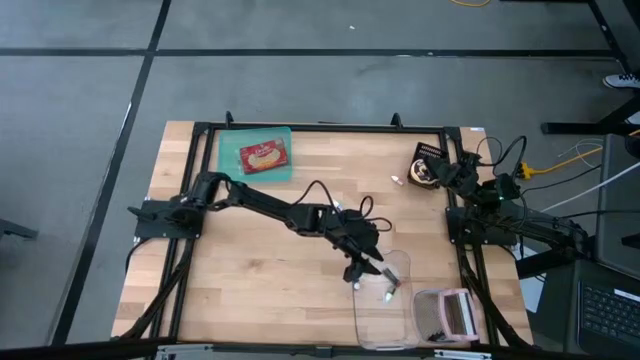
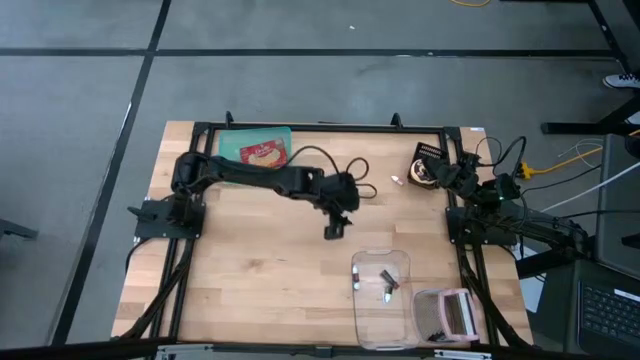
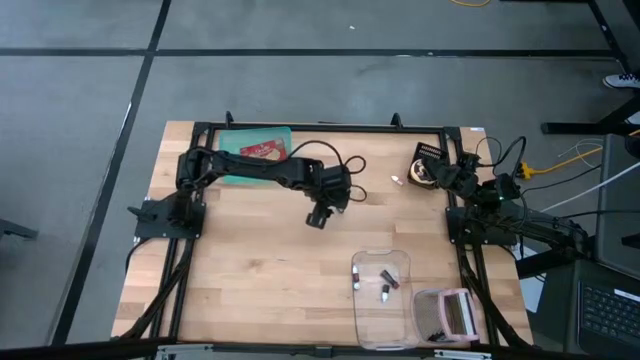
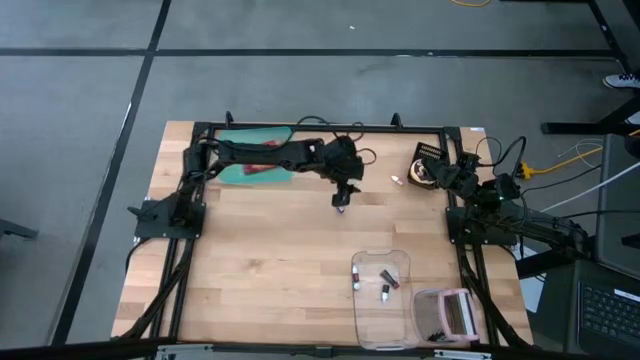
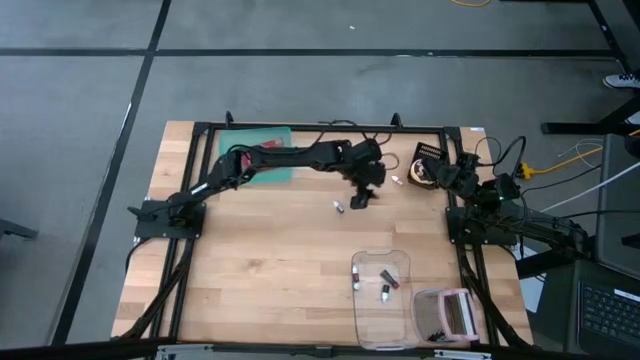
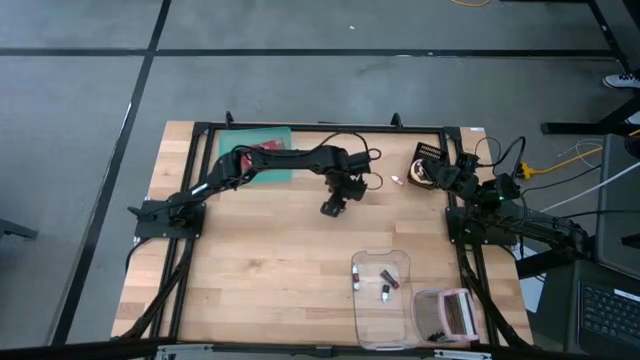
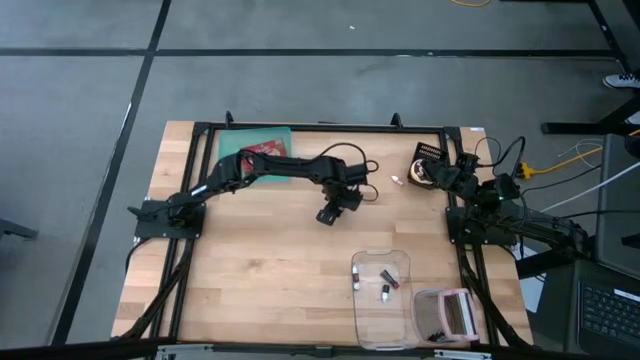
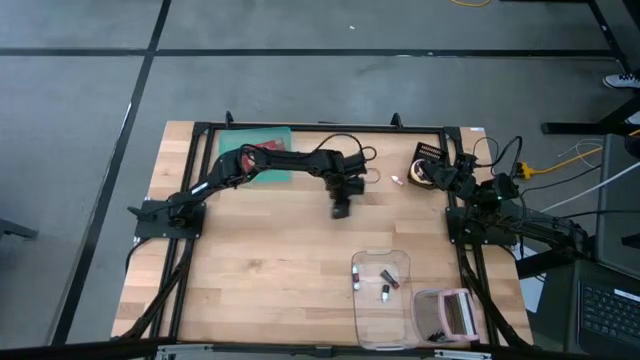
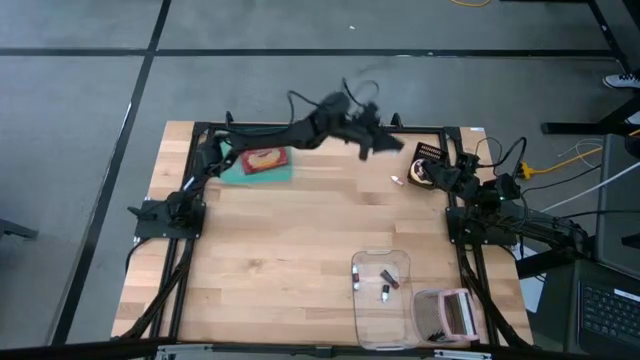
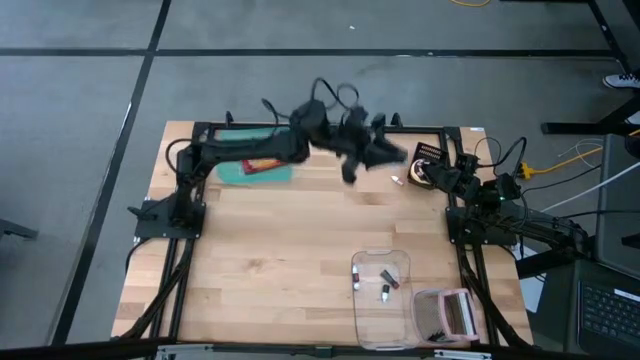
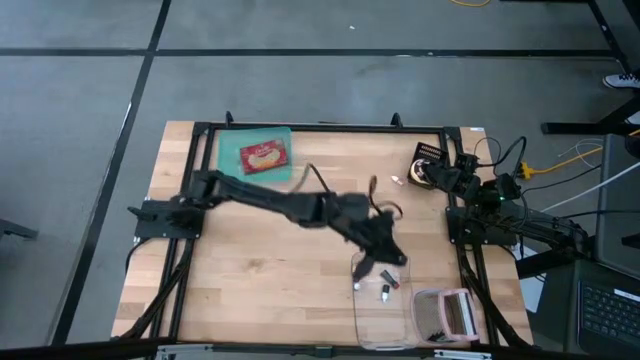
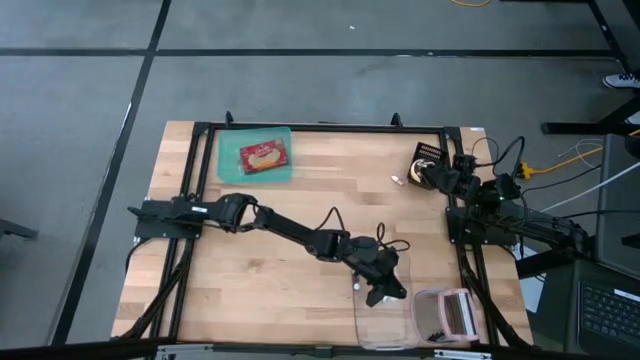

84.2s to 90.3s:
Put the purple food coloring bottle into the transparent bin

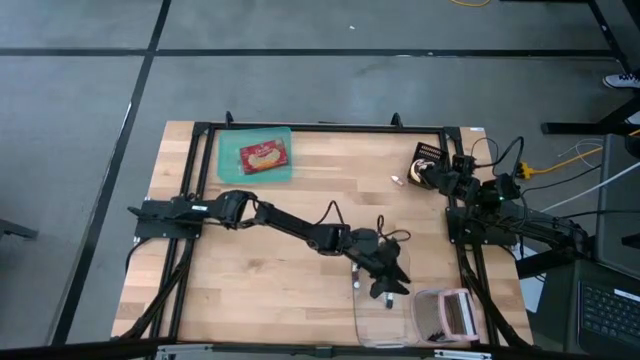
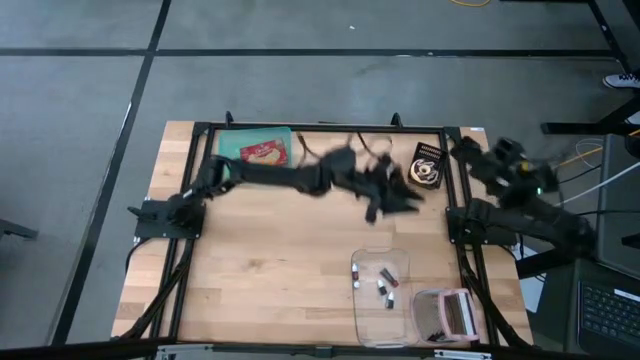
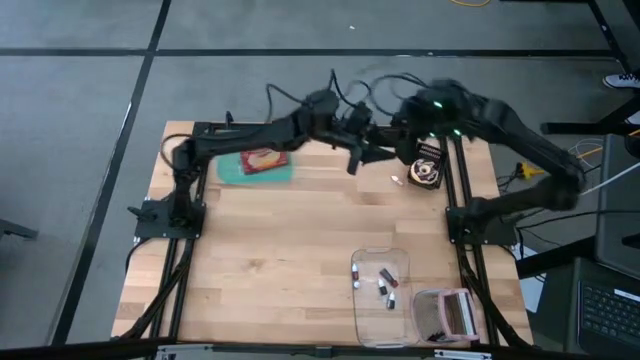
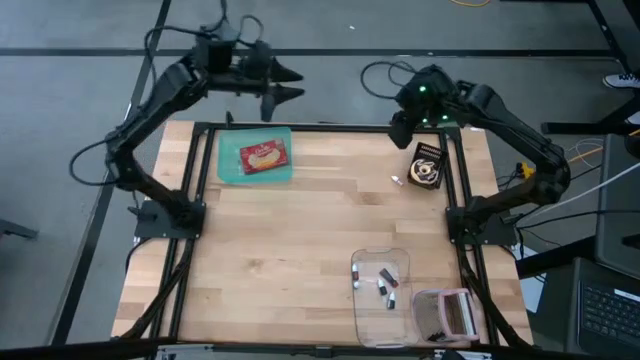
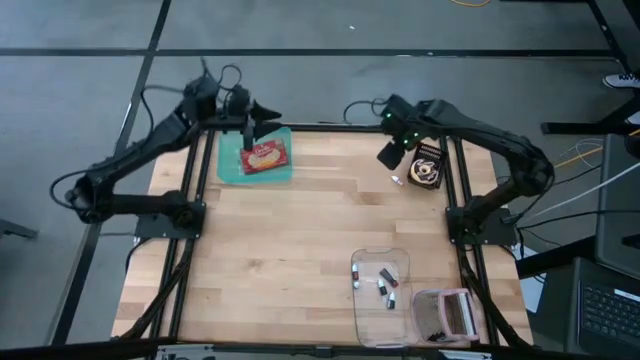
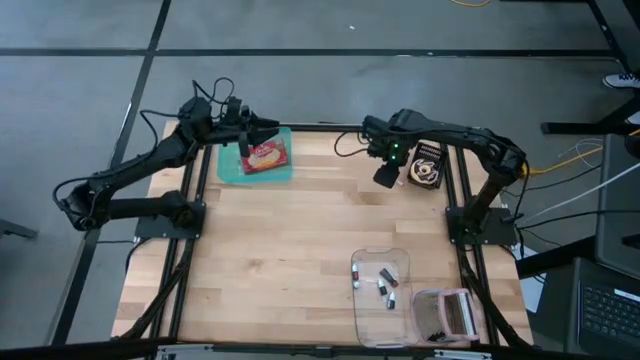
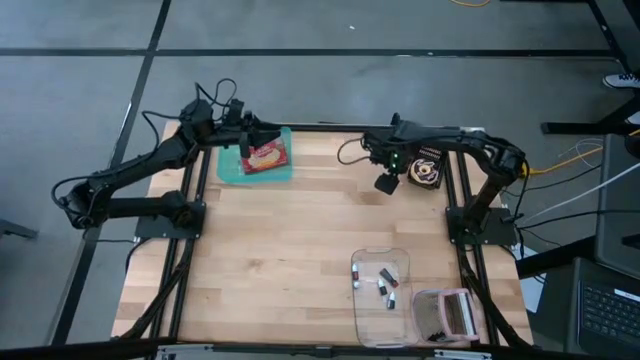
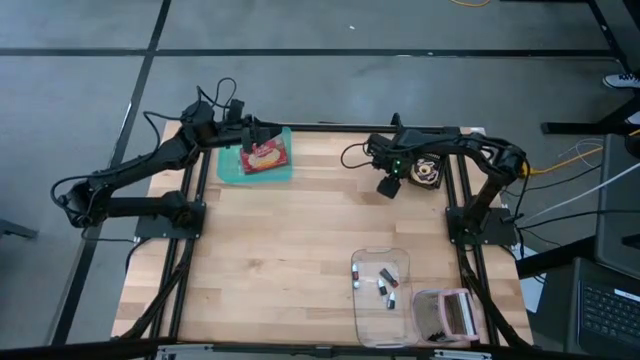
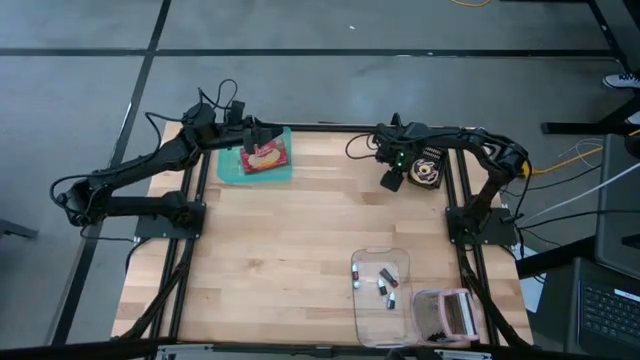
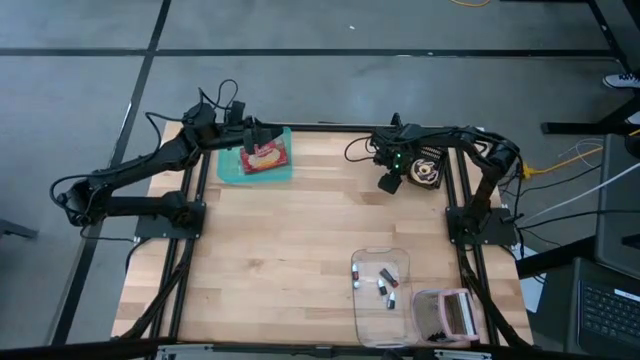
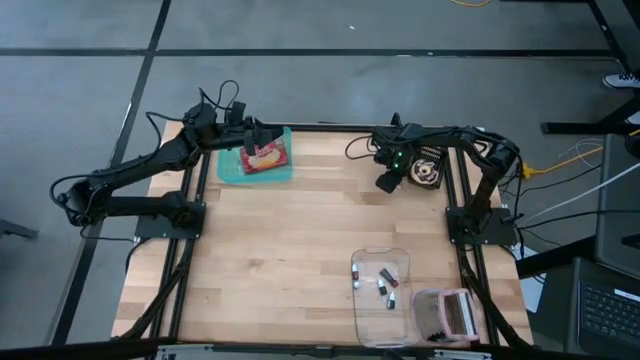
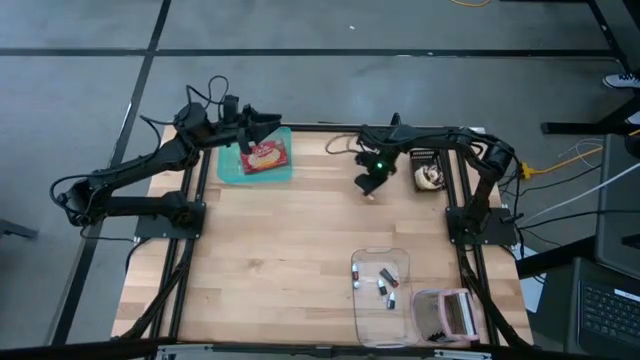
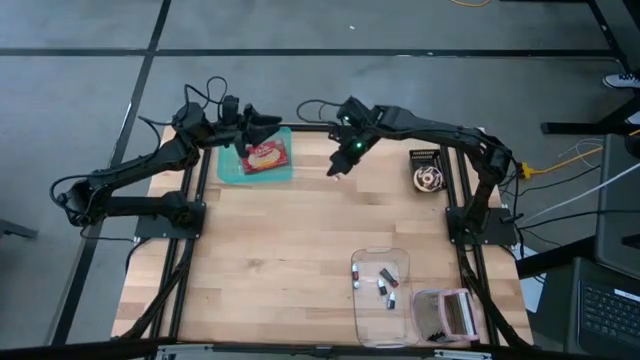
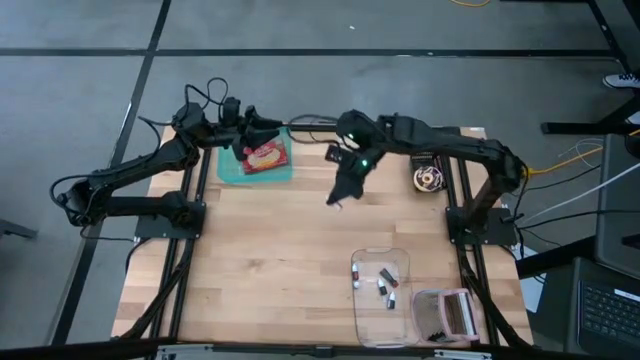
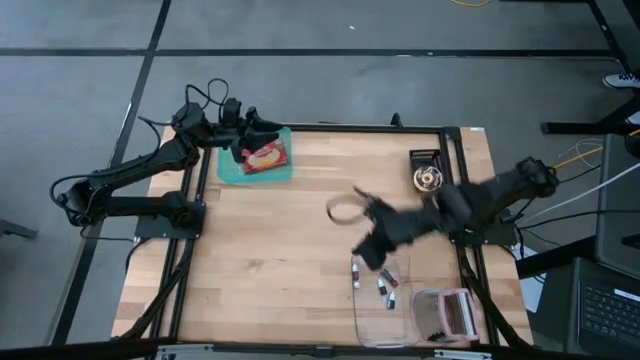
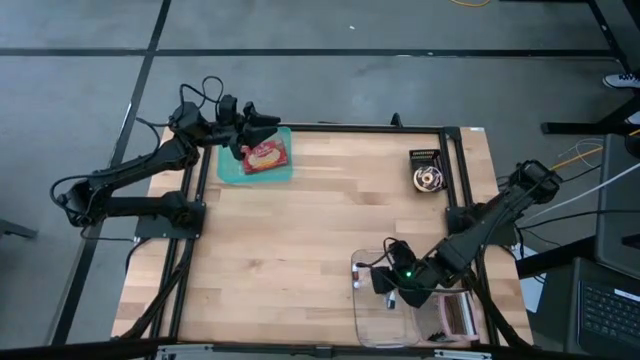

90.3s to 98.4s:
Put the orange food coloring bottle into the transparent bin
